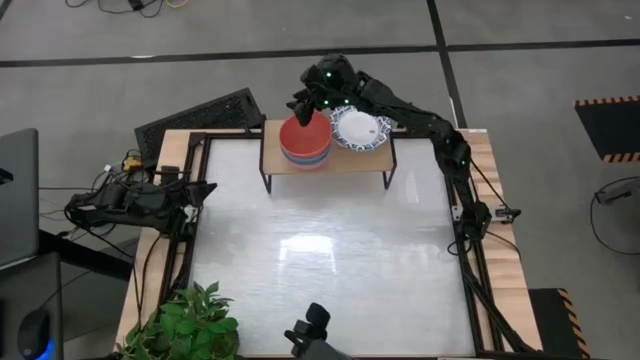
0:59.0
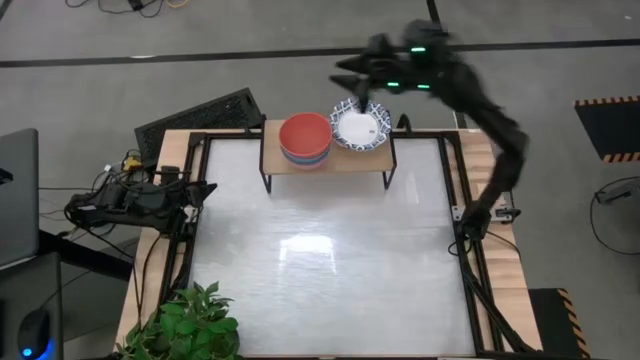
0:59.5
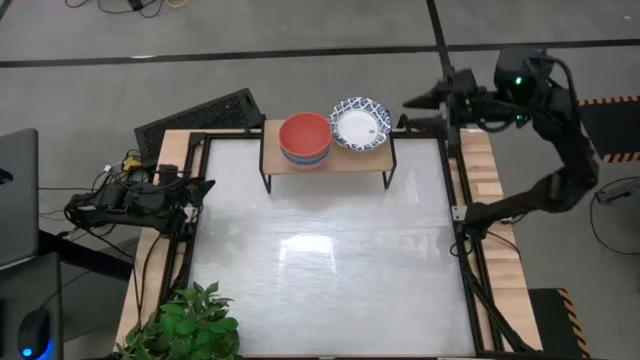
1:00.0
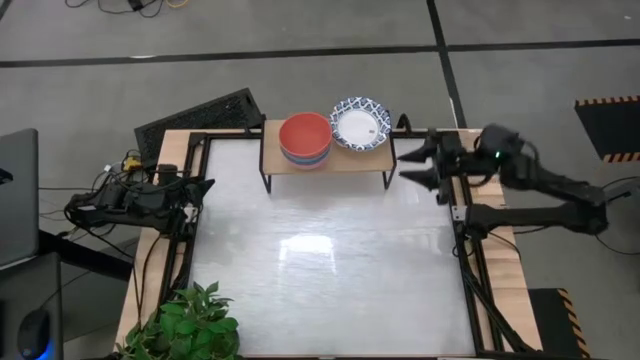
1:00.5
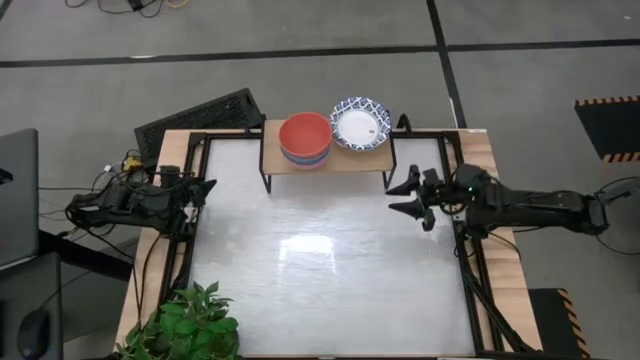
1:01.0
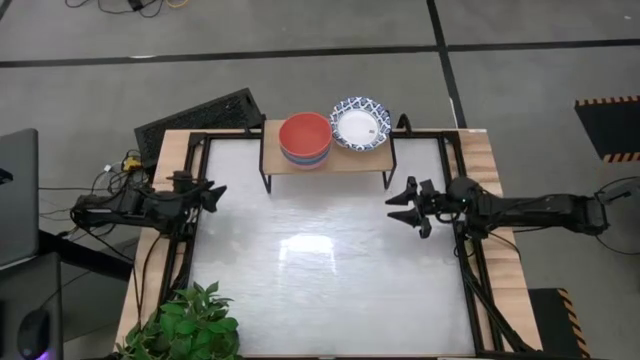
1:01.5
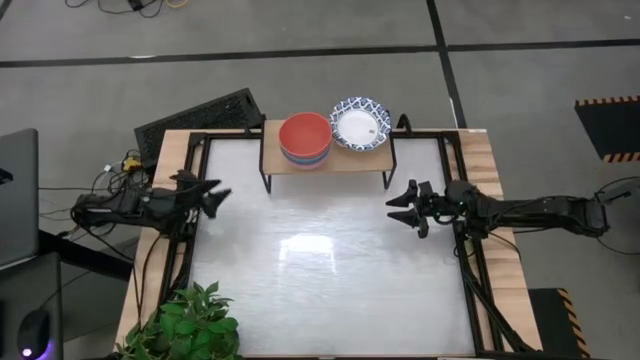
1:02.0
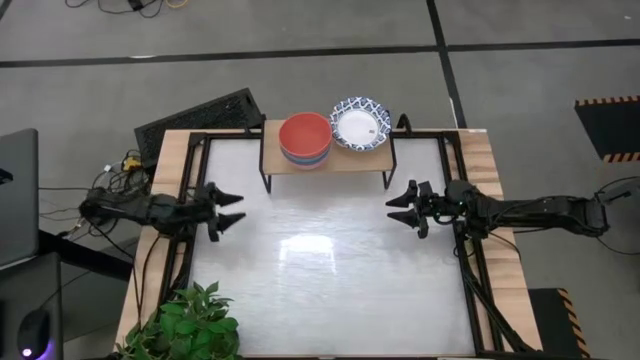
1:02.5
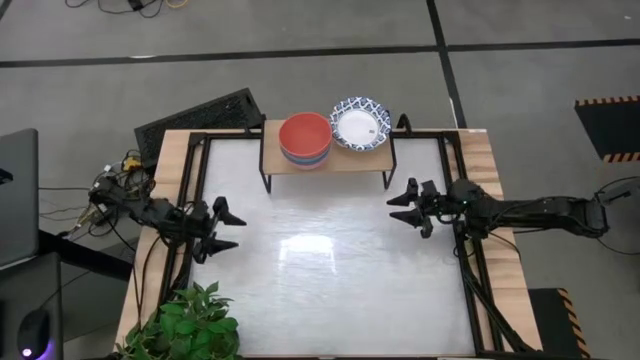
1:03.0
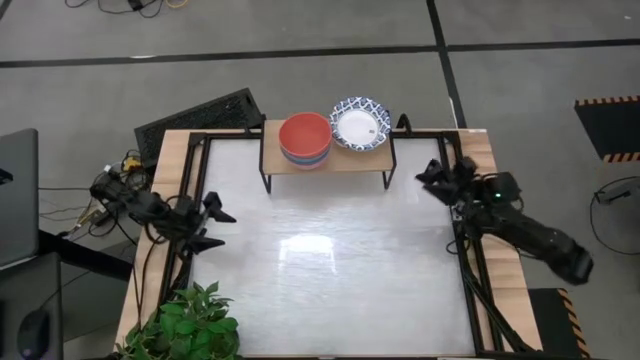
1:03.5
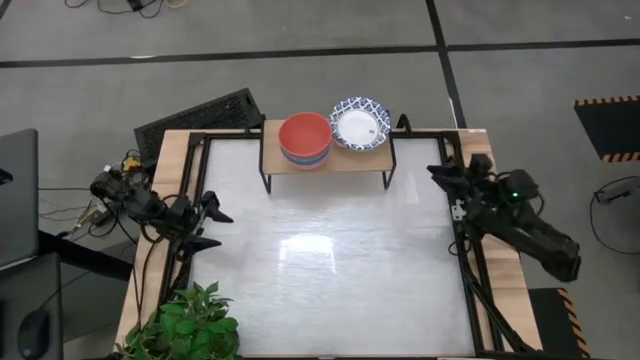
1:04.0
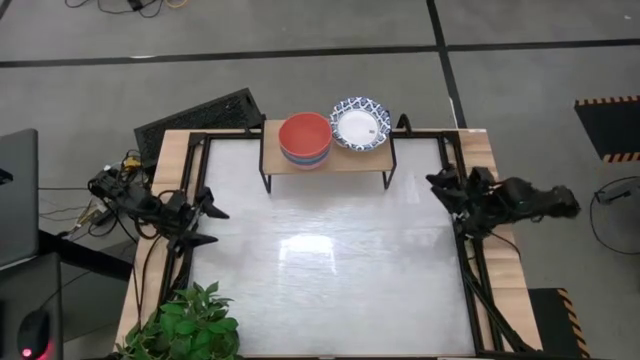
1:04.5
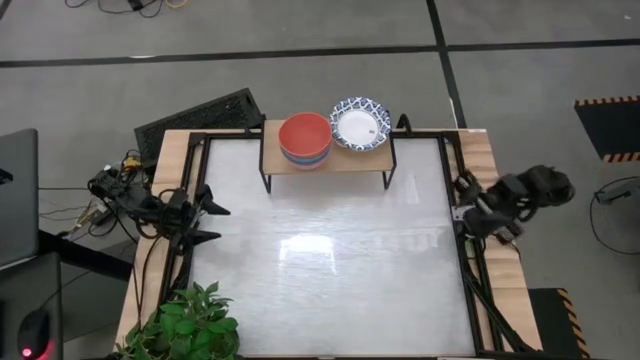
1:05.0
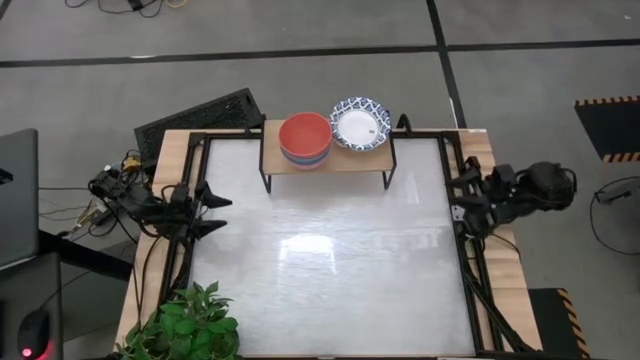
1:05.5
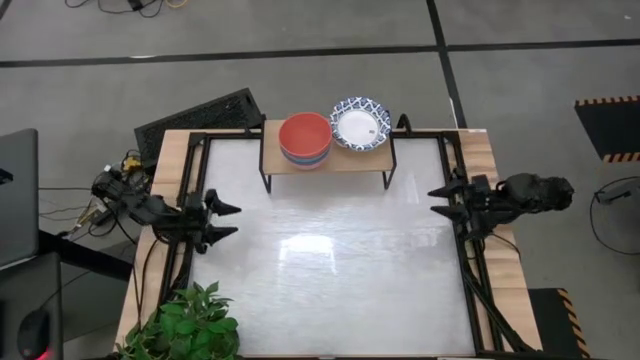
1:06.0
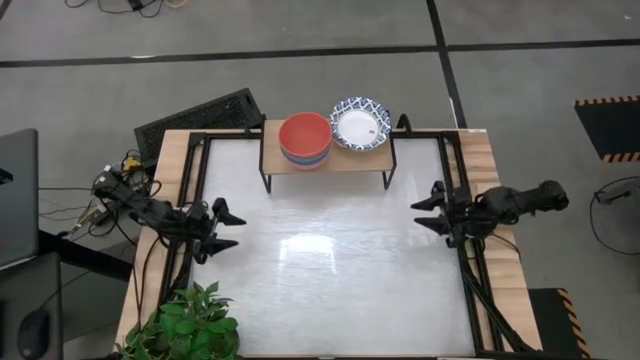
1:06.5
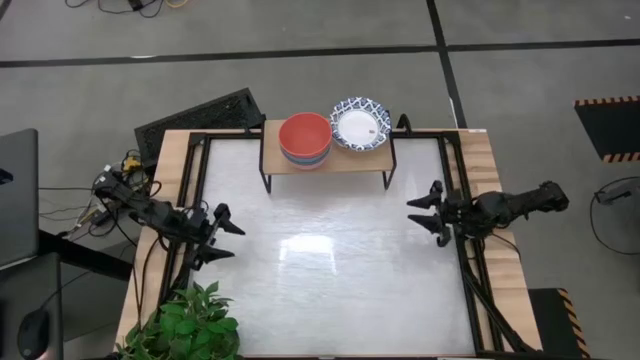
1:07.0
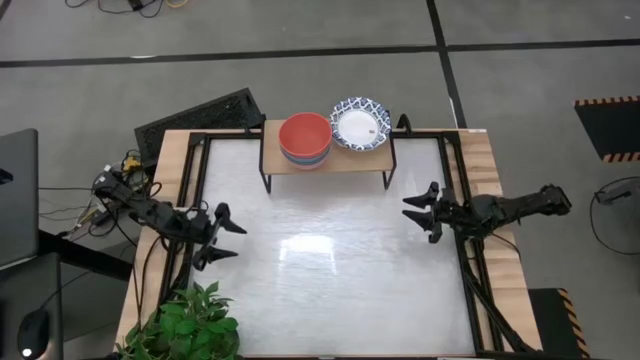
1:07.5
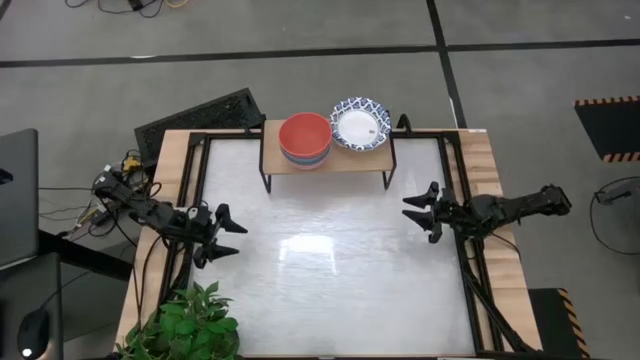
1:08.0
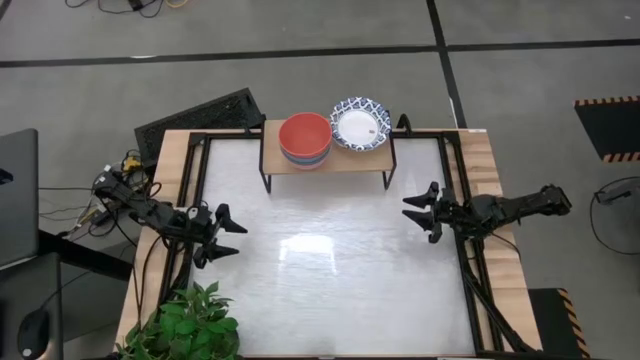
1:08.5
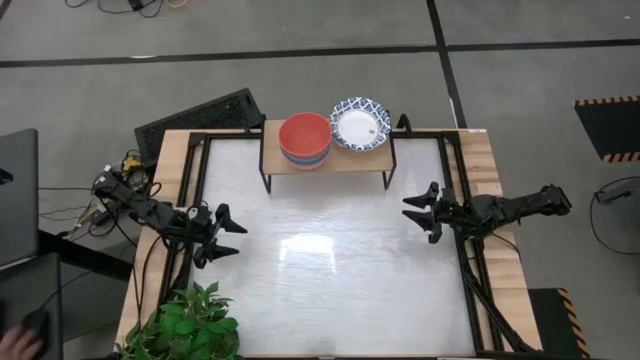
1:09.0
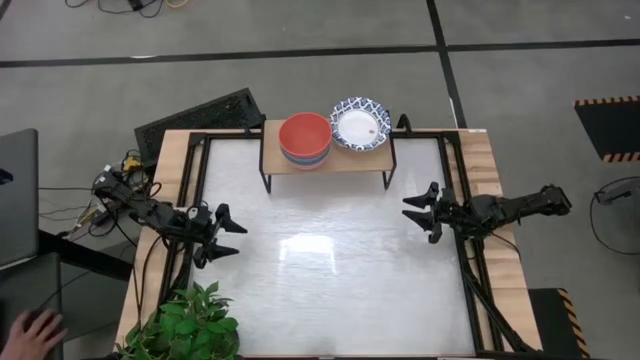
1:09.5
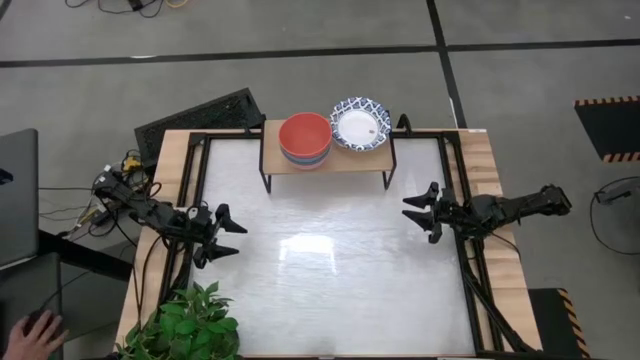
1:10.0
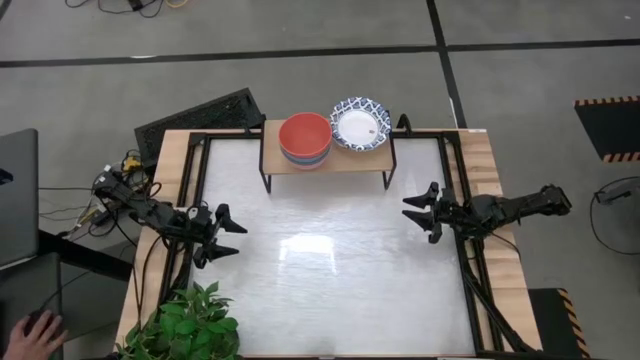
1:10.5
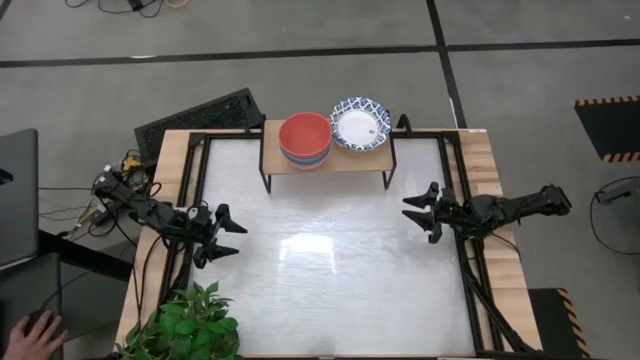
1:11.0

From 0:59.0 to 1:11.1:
Task: Place and stack bowls onto a shelf
Return to Home Position

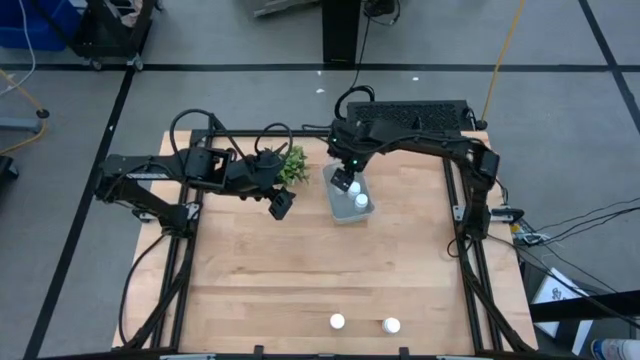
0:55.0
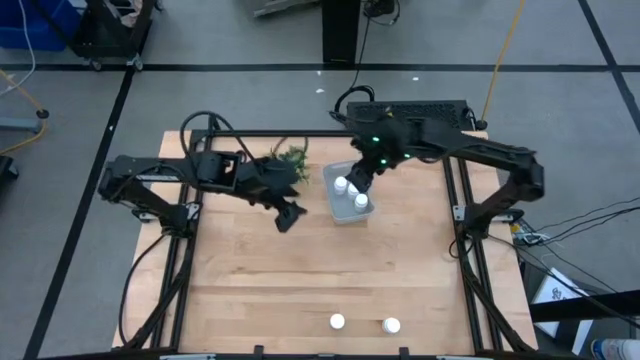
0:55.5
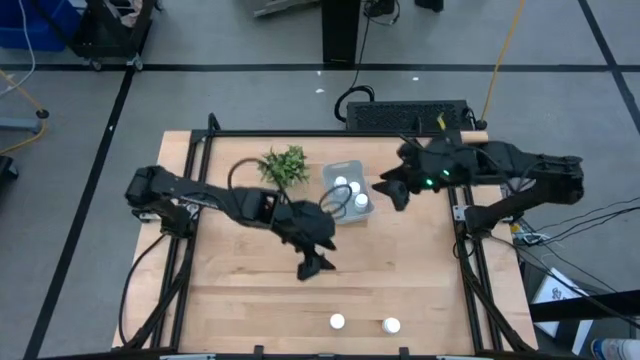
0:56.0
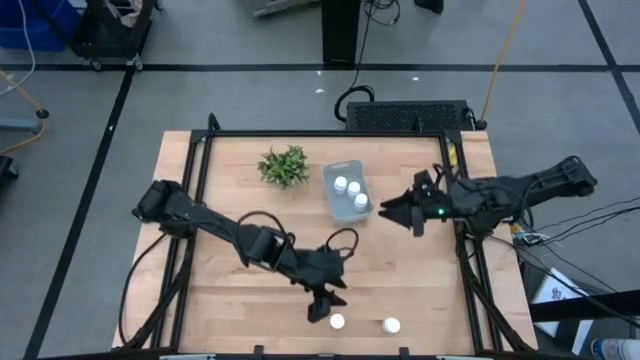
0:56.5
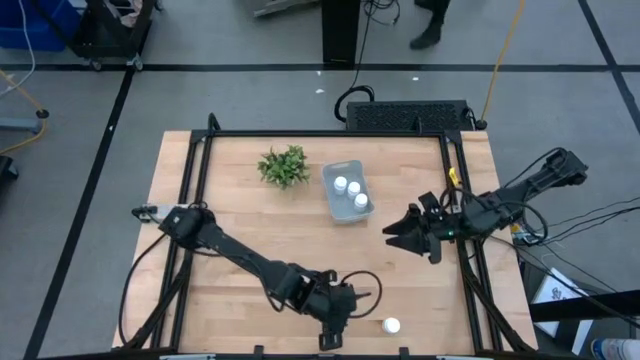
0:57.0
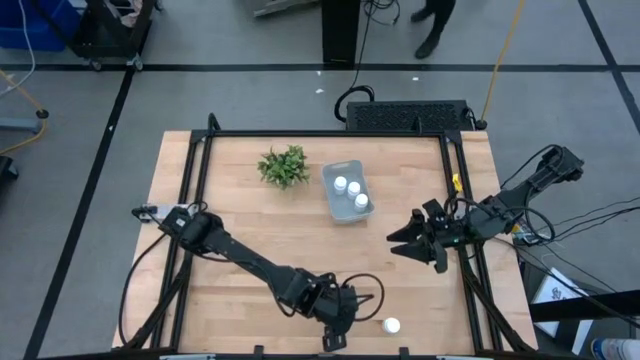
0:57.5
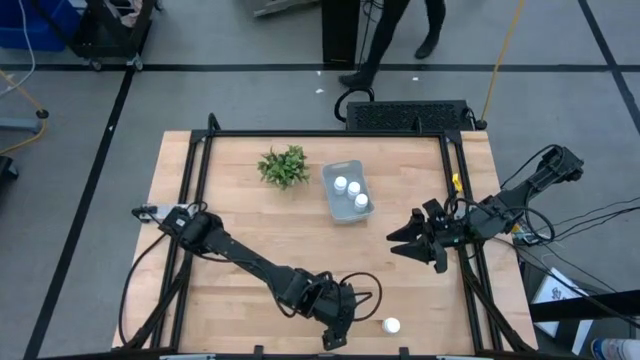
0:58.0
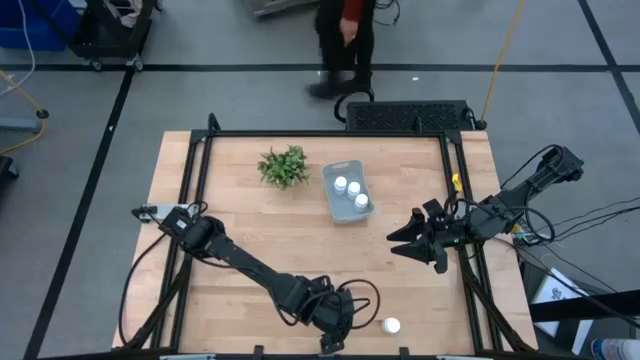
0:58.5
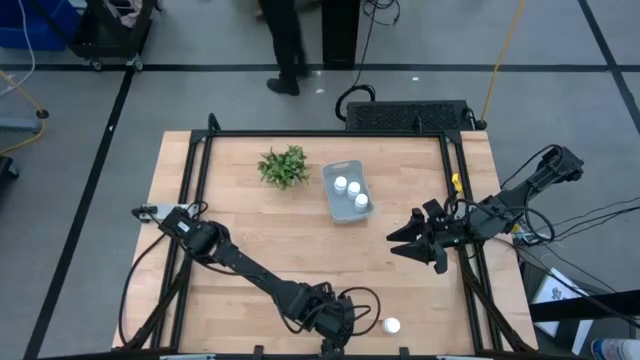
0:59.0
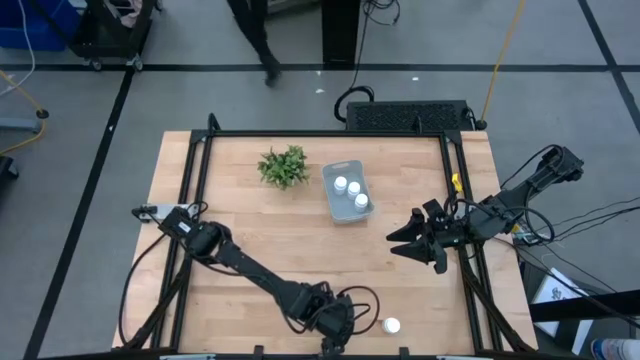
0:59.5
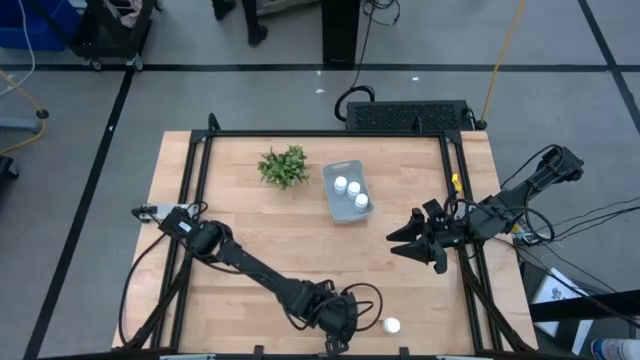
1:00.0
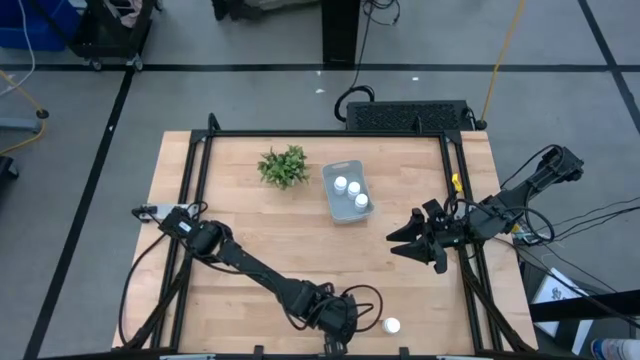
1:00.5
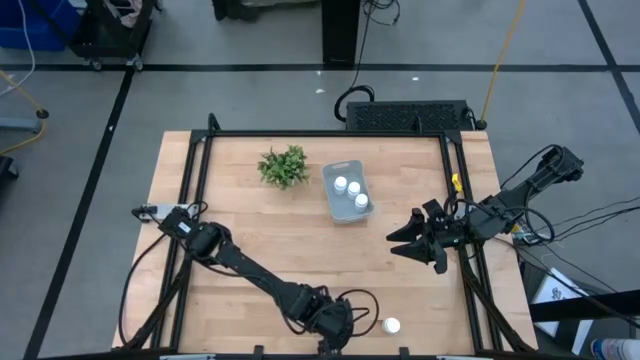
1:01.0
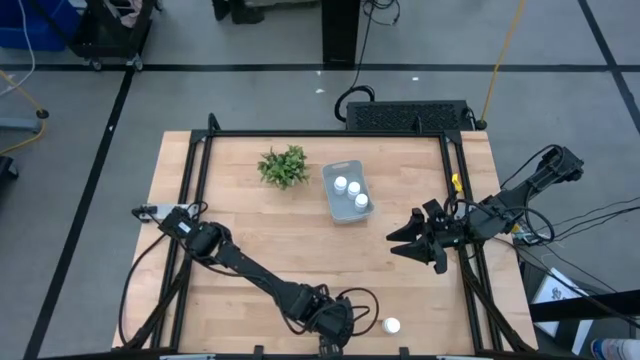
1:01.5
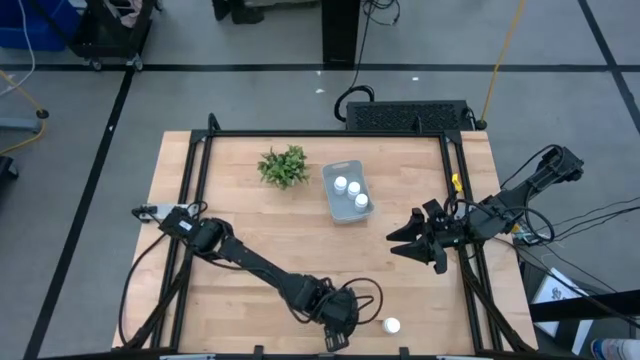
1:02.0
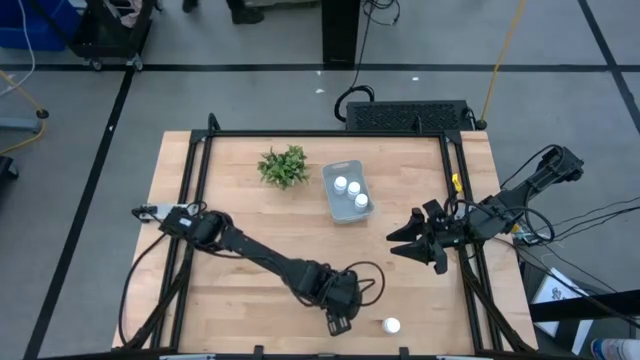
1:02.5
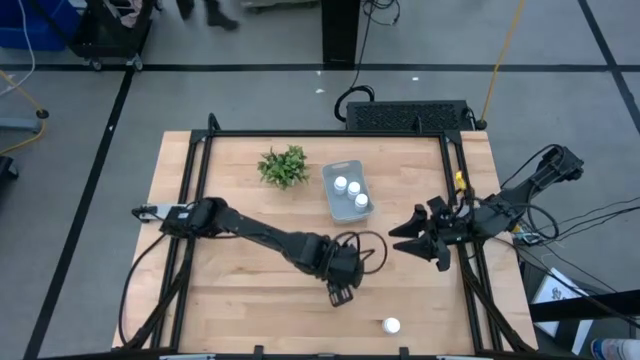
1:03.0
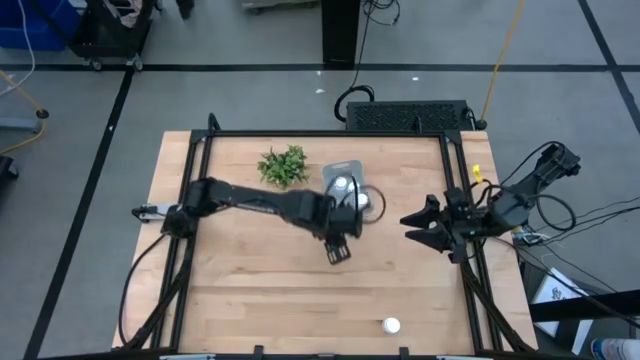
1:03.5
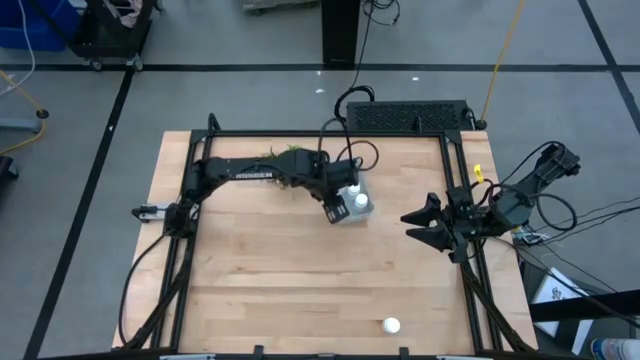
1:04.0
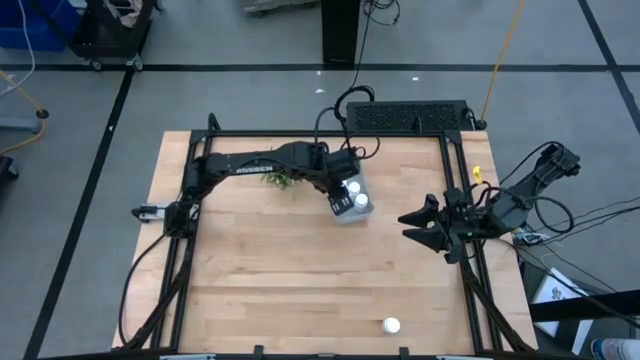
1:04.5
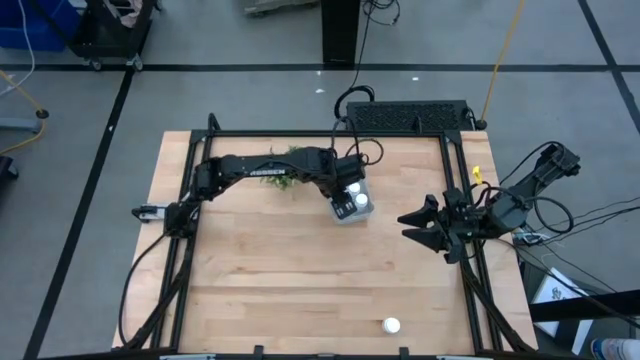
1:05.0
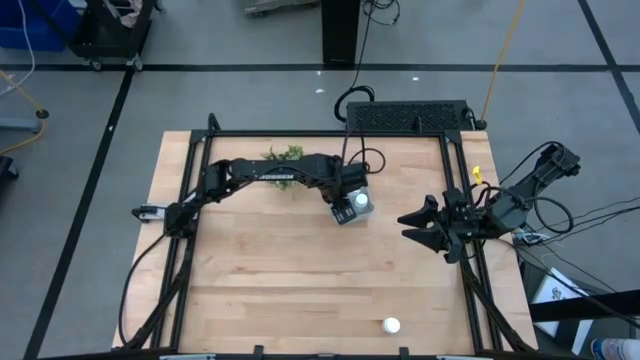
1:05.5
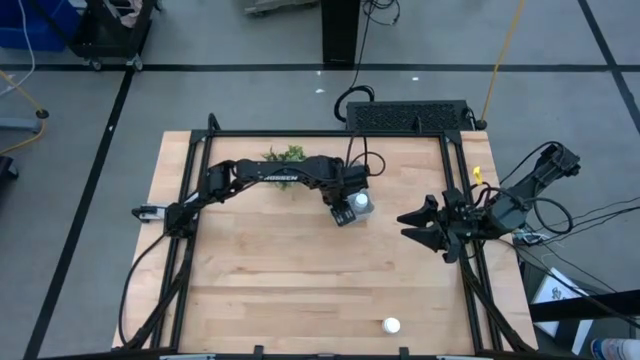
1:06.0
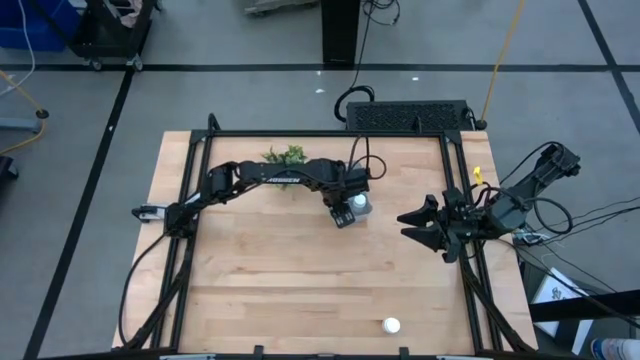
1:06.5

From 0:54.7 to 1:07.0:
Task: Pick and place pill bottles into a basket
Put the white pill bottle into the gray bin
